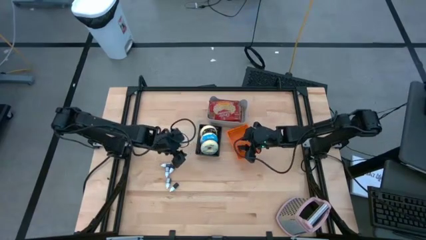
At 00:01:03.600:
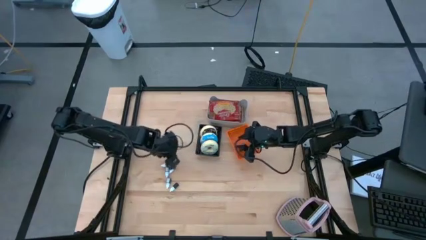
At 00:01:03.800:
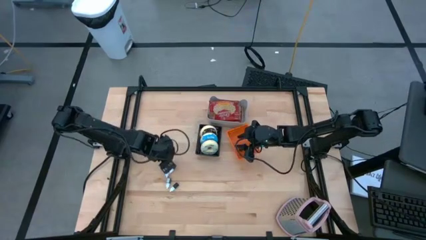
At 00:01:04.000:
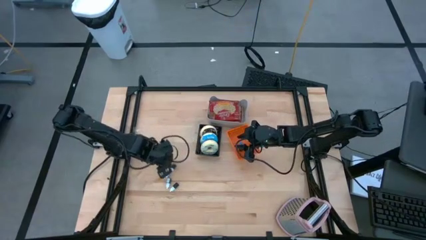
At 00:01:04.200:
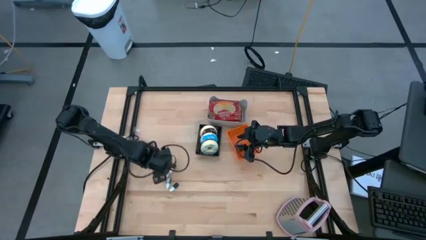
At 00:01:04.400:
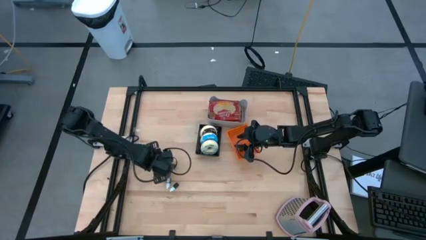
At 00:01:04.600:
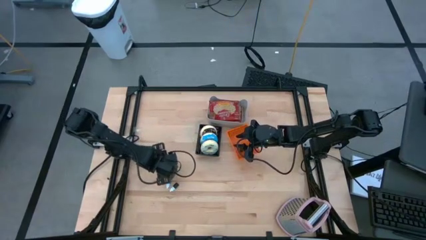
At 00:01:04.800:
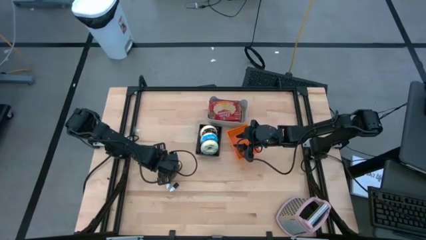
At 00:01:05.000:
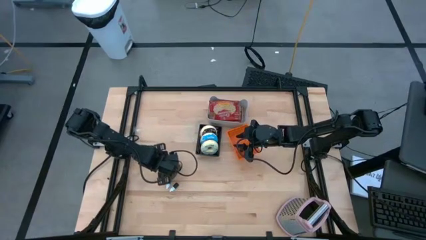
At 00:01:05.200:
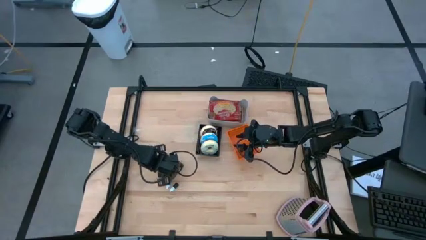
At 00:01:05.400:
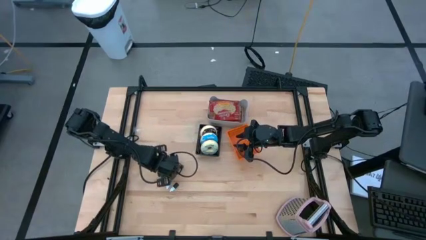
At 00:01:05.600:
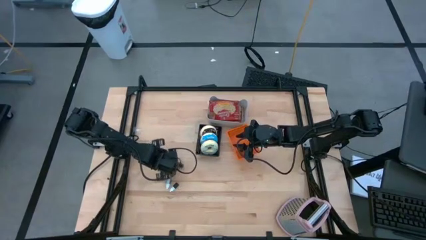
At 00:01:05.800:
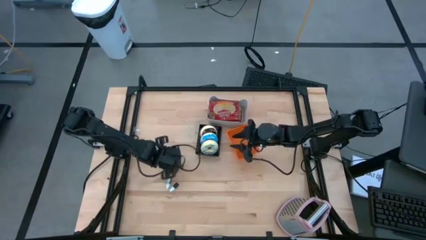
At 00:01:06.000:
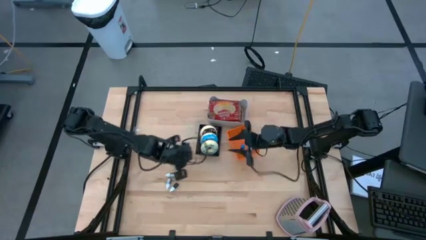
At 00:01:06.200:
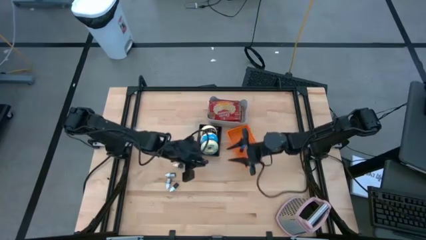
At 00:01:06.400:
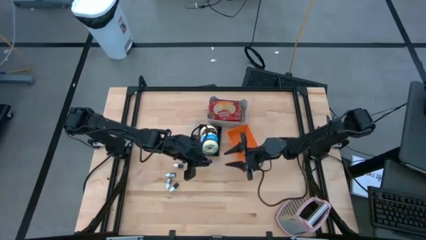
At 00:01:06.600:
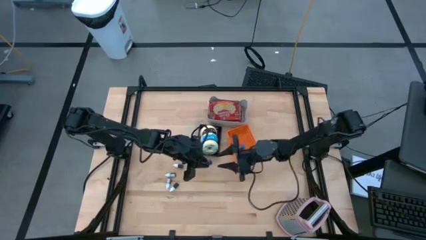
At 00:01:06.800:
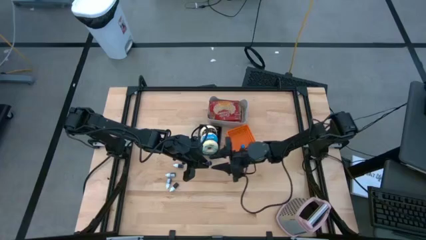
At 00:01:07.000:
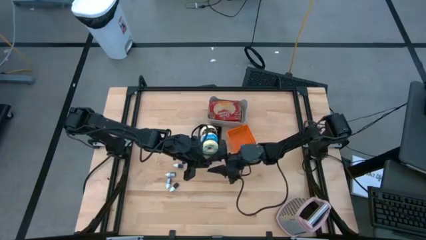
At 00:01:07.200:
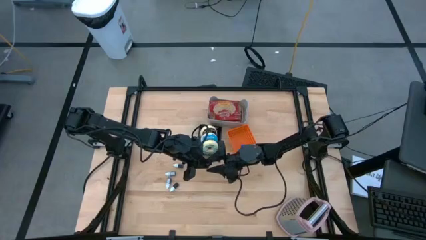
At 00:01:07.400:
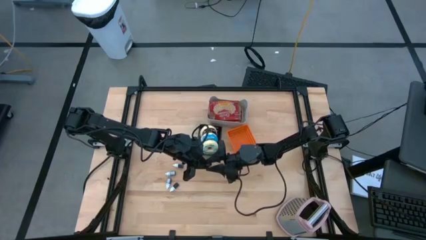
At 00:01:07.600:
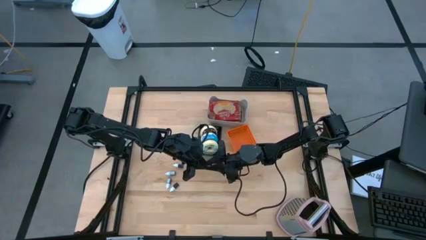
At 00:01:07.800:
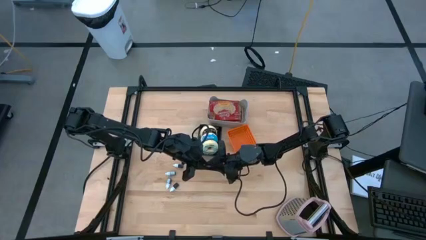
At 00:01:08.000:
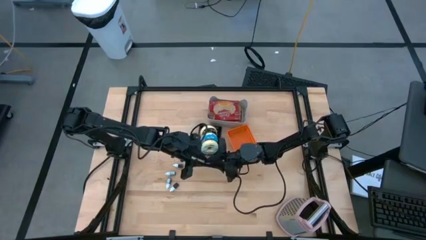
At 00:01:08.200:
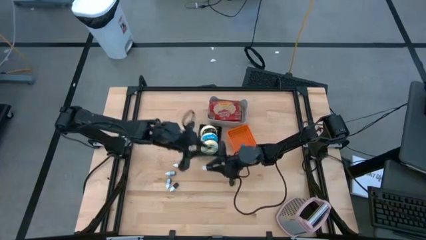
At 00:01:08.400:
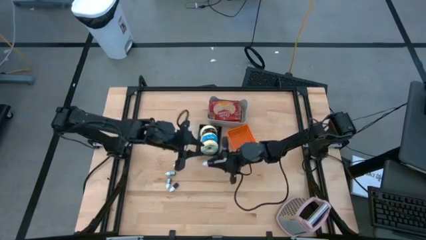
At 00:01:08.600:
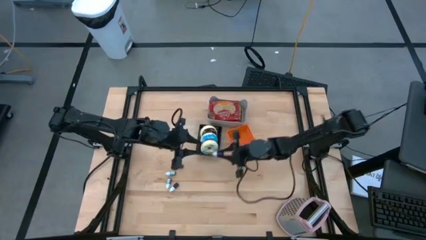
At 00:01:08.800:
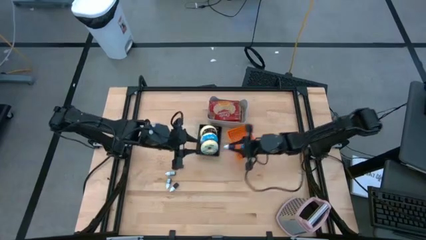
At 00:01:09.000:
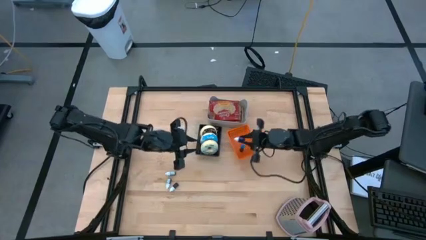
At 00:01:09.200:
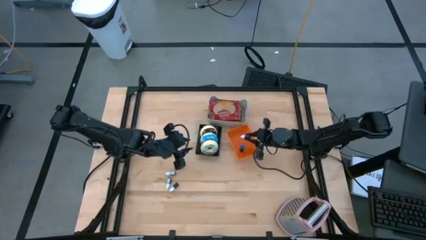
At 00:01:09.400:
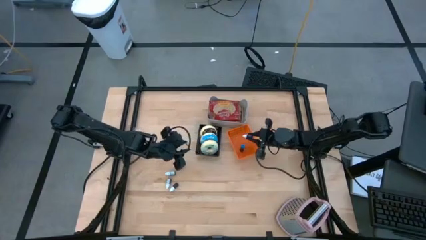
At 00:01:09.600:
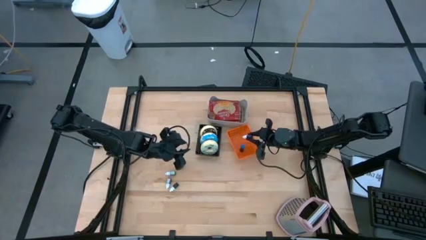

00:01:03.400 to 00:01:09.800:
Put the purple food coloring into the orange bin

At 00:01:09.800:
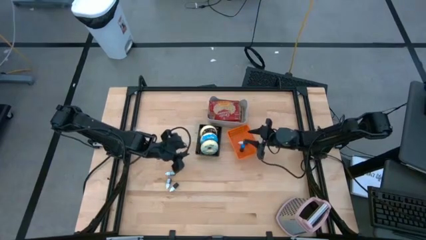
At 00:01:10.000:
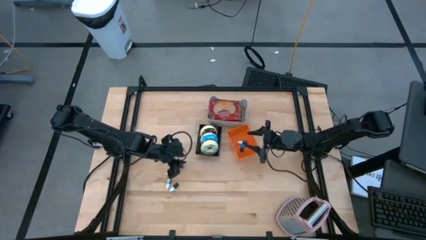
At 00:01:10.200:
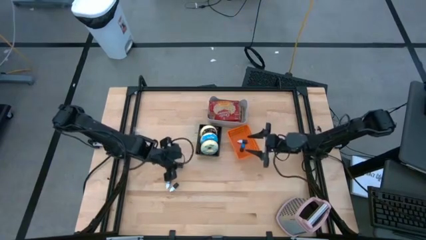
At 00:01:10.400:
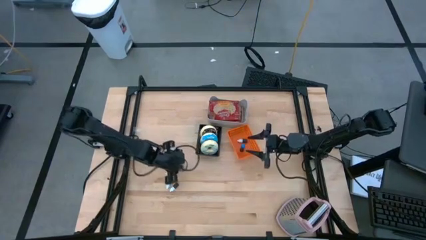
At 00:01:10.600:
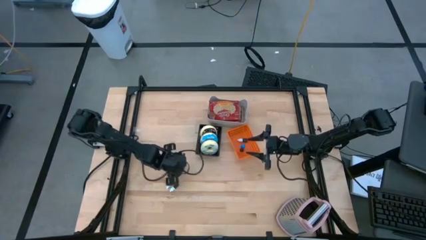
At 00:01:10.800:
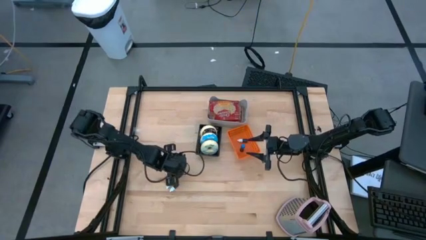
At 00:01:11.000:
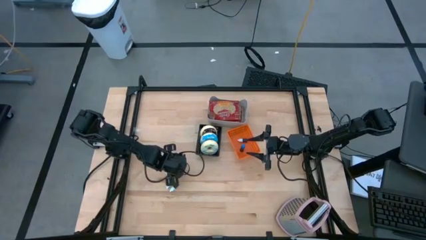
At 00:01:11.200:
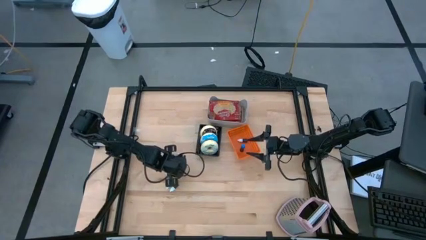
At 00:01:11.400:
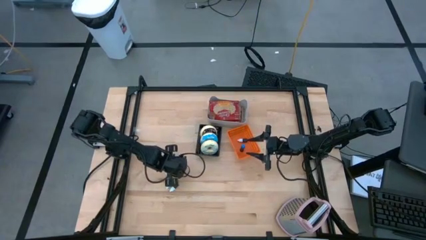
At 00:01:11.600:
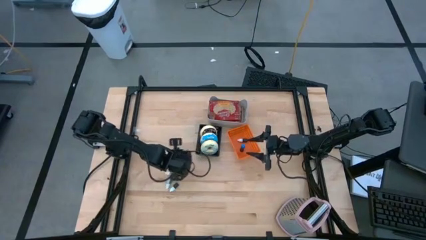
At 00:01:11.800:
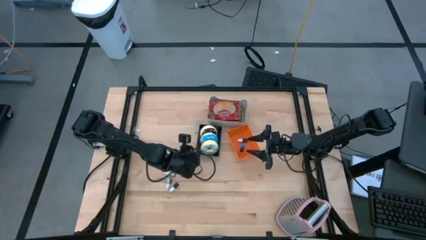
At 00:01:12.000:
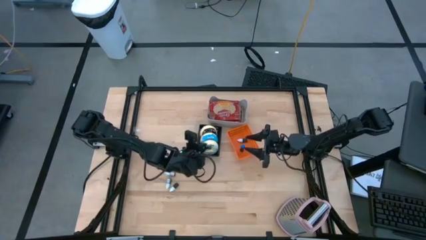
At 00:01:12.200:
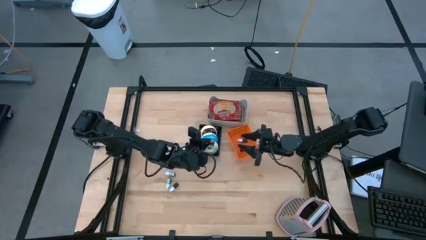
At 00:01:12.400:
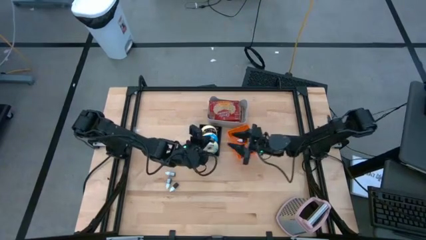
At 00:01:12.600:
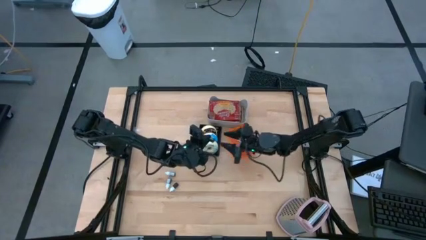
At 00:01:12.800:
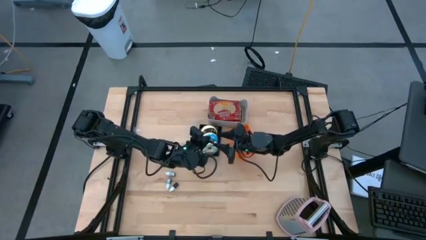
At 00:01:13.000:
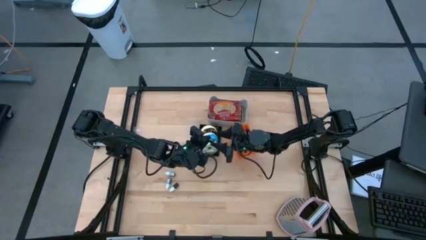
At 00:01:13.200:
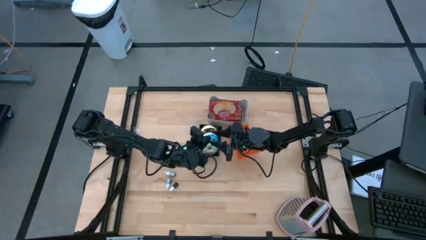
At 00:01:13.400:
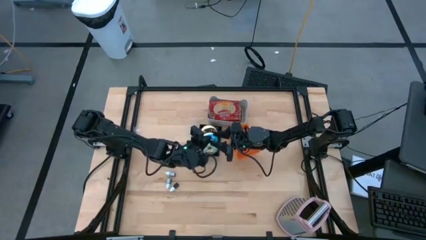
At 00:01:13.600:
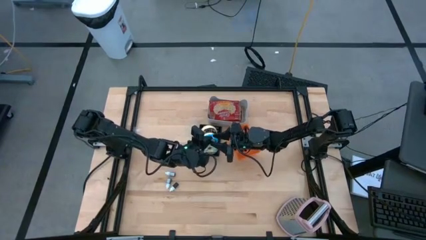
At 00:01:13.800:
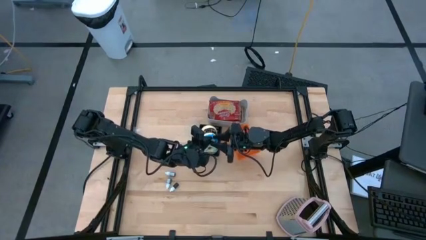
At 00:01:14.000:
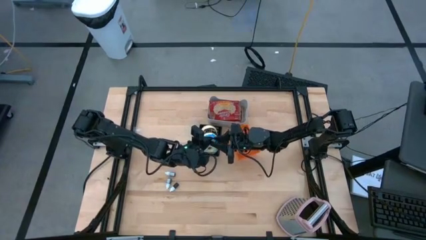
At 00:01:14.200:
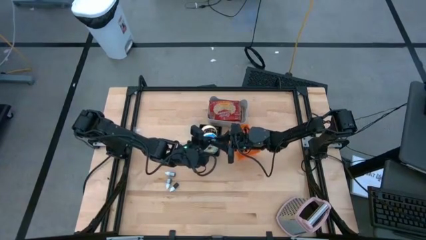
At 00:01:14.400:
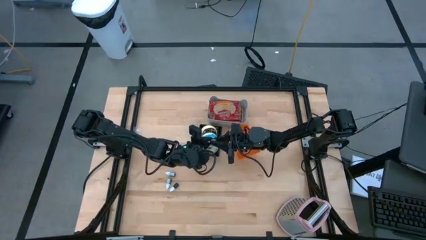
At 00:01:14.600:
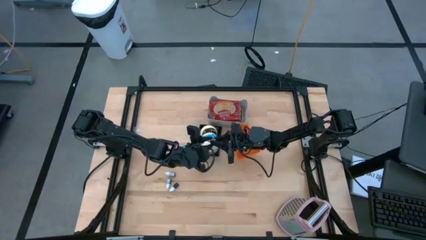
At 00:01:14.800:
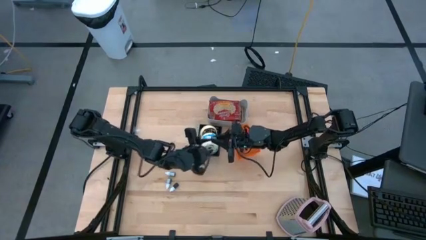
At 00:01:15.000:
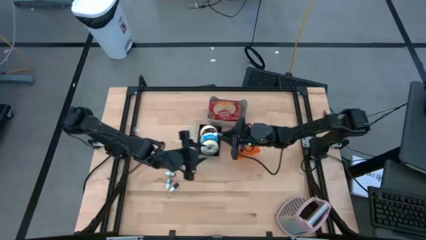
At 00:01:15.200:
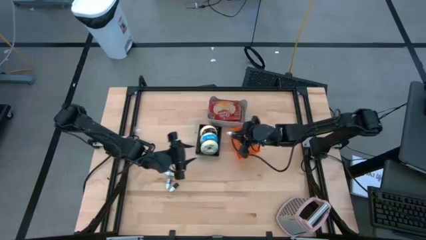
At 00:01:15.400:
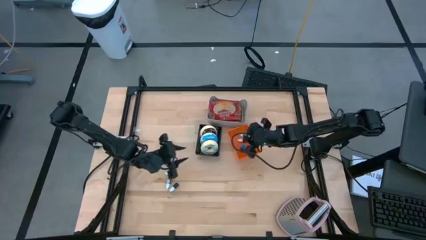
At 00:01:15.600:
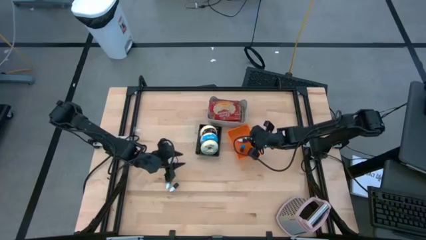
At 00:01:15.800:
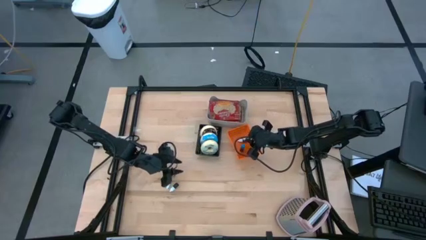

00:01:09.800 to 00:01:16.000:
Put the dark green food coloring into the orange bin

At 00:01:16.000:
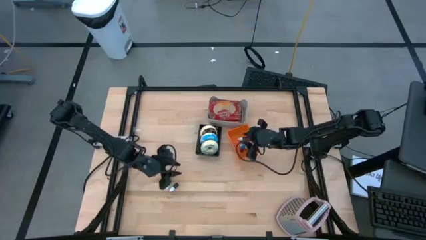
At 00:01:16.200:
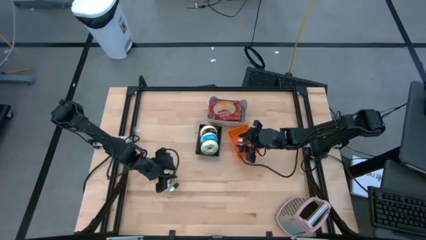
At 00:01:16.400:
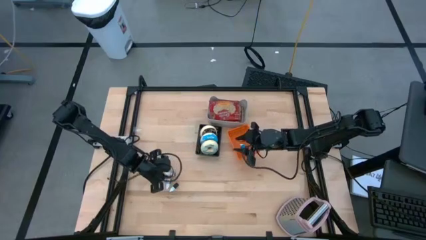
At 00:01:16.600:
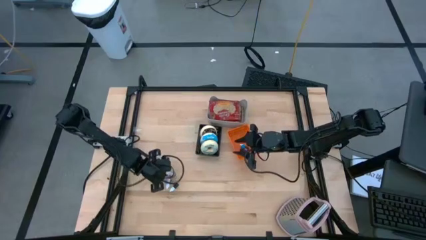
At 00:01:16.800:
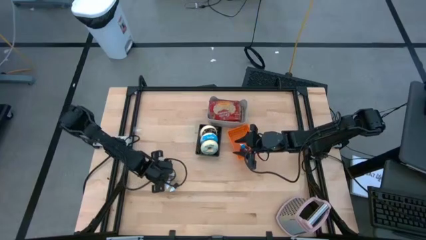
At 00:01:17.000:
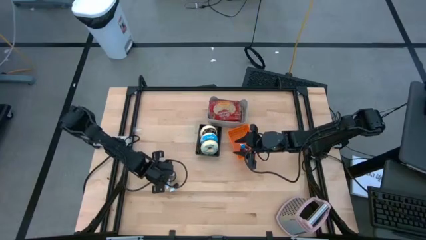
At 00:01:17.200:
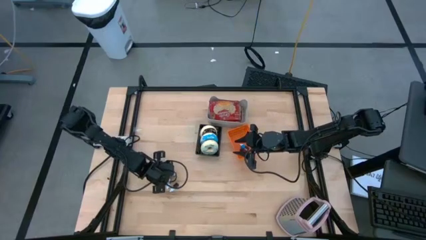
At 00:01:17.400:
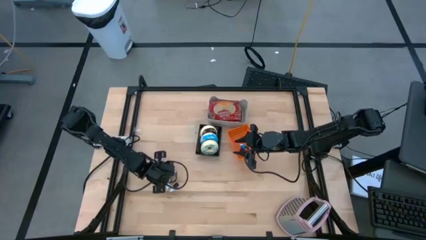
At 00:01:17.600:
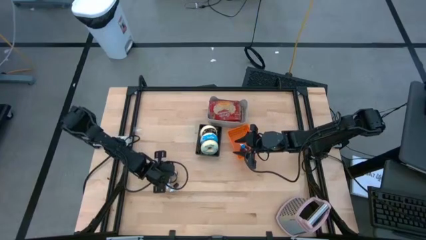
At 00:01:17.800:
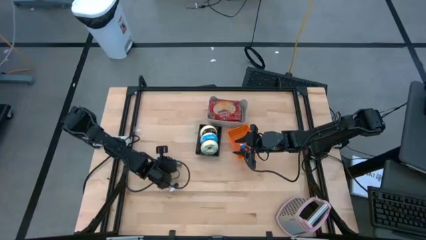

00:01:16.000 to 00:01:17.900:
Put the green food coloring into the orange bin

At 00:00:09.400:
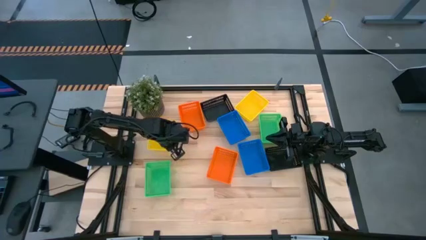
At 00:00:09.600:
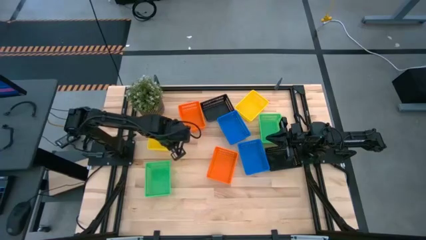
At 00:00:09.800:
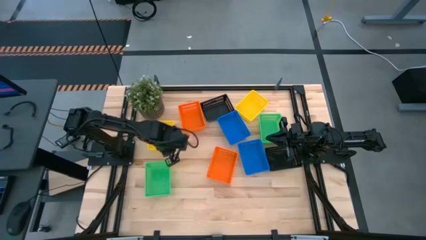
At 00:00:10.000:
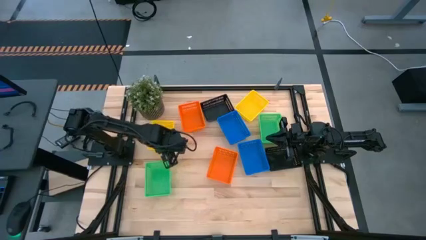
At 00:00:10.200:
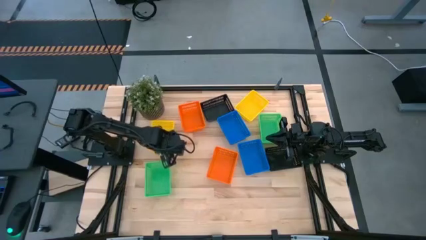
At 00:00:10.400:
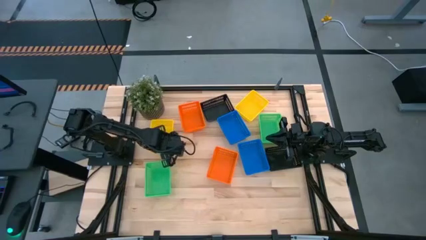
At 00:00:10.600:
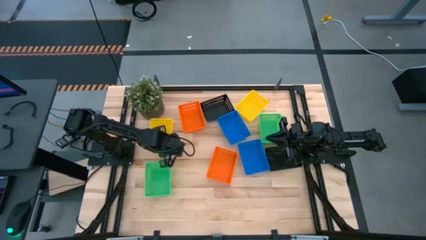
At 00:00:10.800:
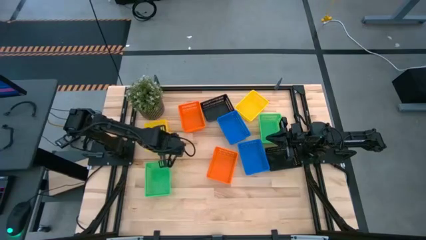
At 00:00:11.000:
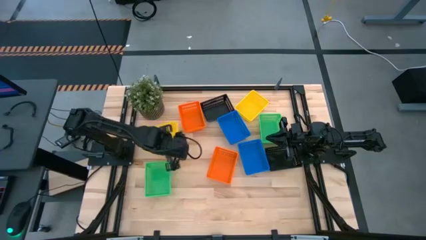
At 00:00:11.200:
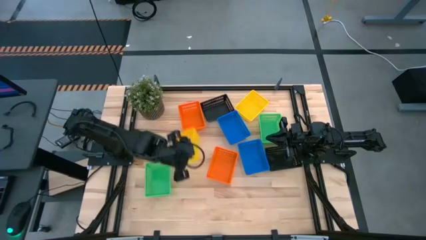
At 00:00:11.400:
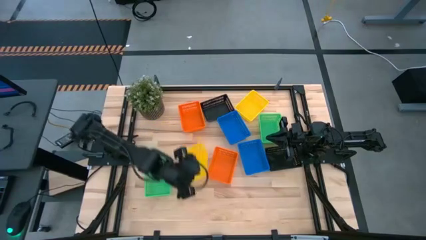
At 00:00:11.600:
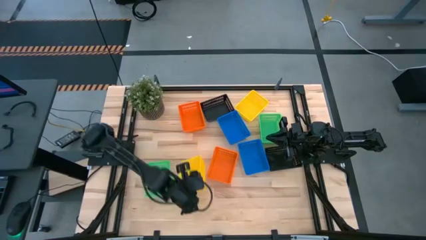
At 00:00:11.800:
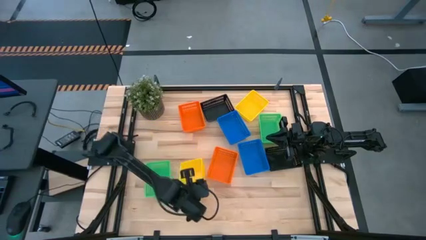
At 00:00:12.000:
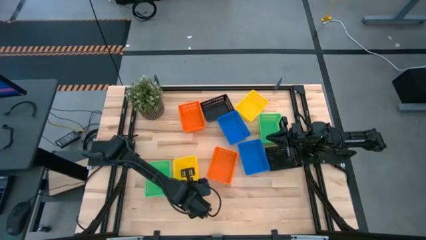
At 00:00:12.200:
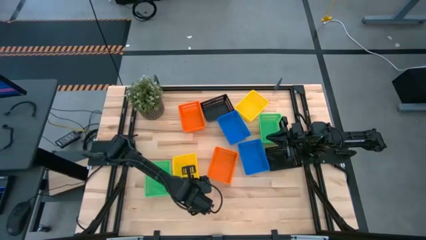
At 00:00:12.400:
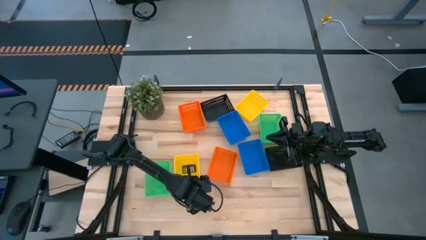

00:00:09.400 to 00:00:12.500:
Move the left yellow bin to the right of the green bin
